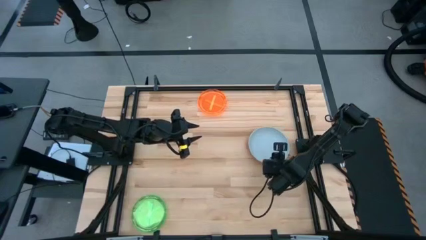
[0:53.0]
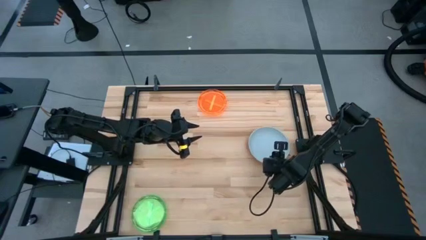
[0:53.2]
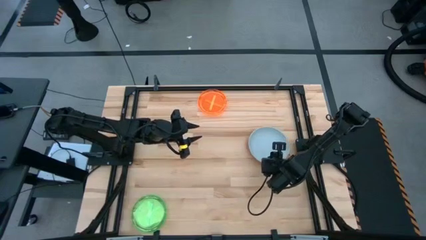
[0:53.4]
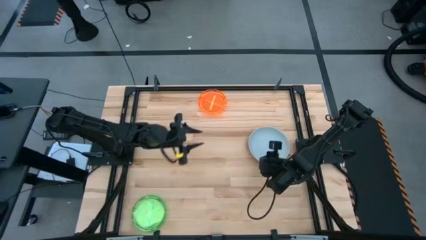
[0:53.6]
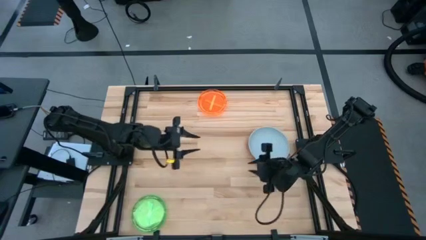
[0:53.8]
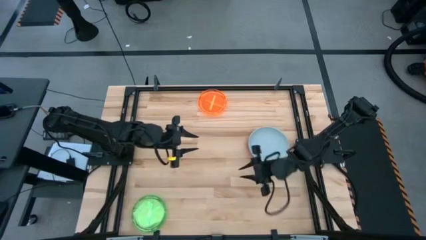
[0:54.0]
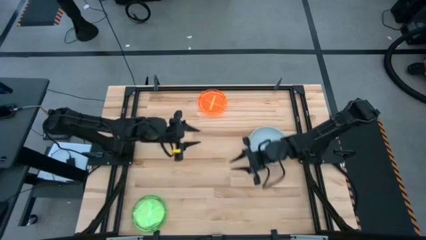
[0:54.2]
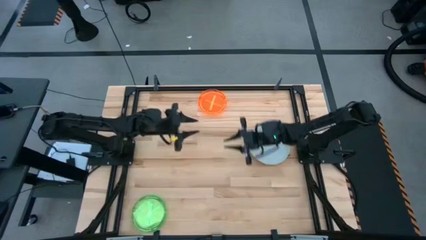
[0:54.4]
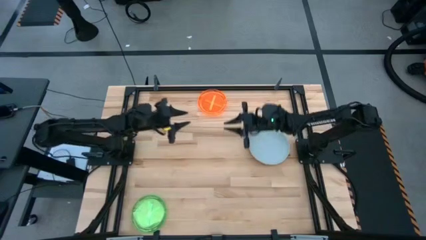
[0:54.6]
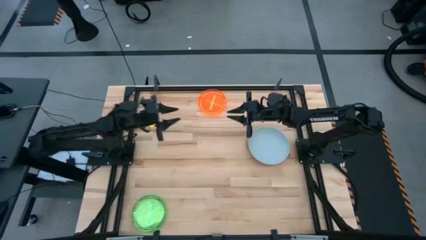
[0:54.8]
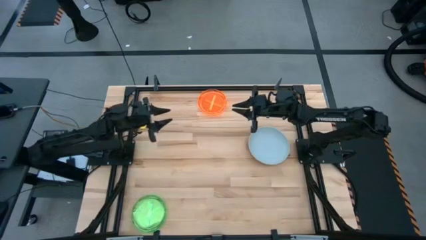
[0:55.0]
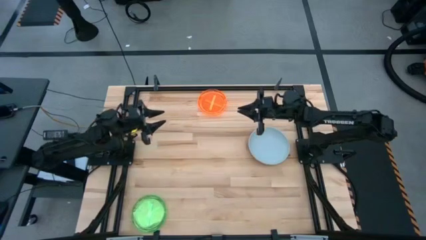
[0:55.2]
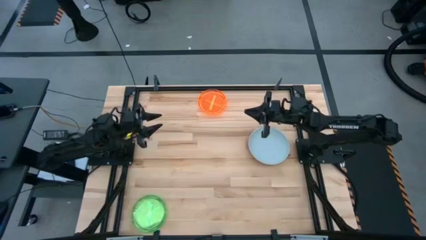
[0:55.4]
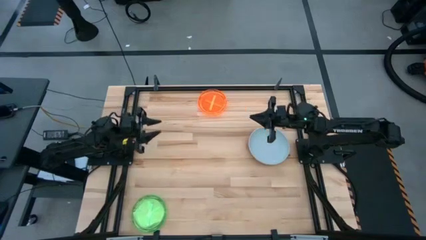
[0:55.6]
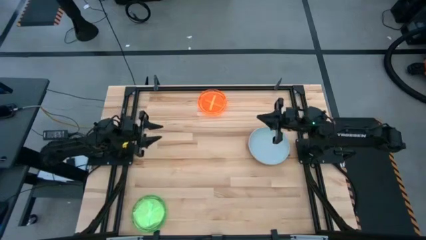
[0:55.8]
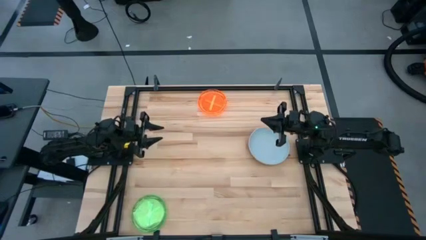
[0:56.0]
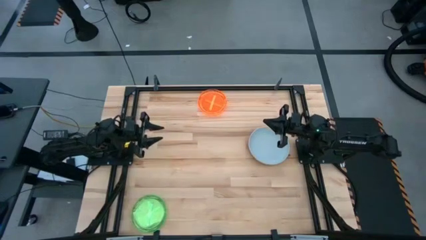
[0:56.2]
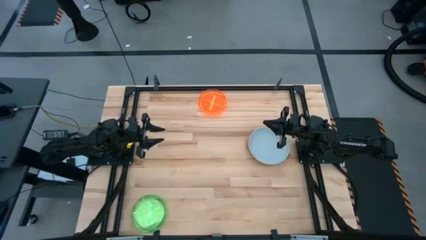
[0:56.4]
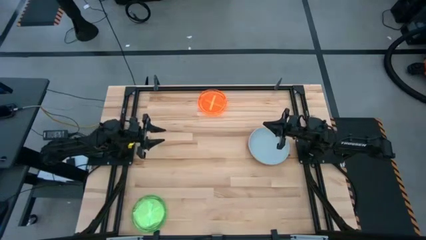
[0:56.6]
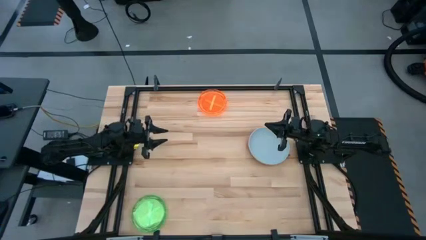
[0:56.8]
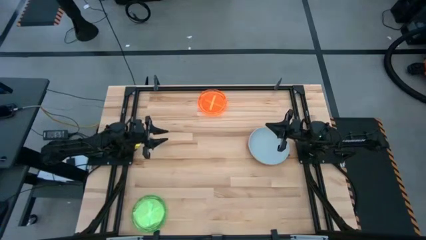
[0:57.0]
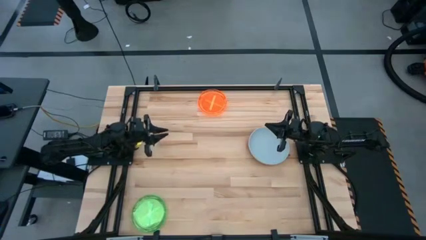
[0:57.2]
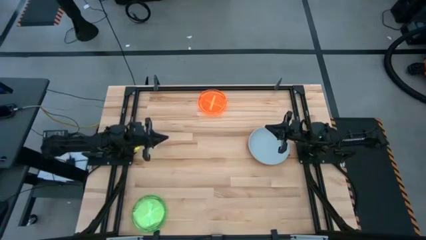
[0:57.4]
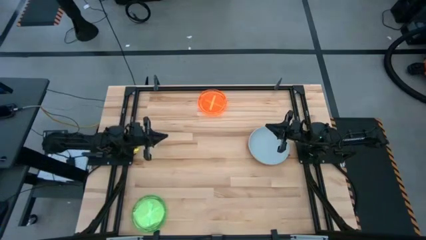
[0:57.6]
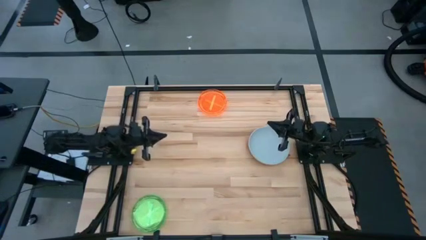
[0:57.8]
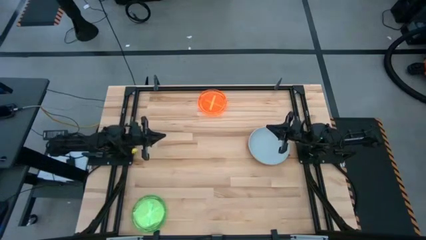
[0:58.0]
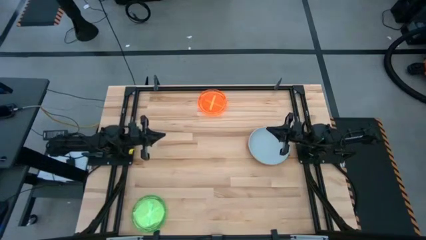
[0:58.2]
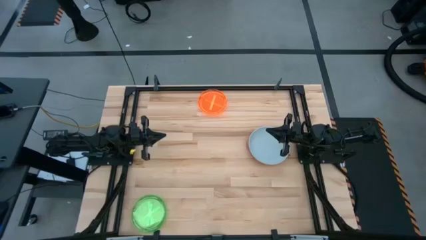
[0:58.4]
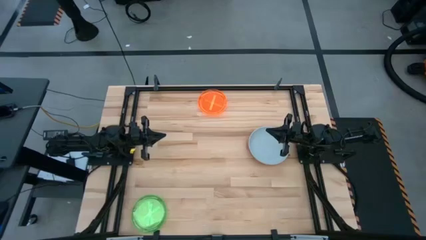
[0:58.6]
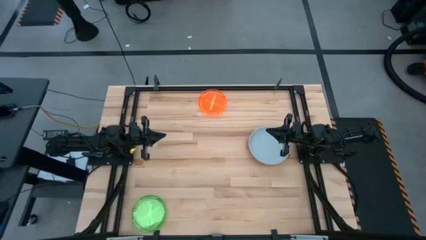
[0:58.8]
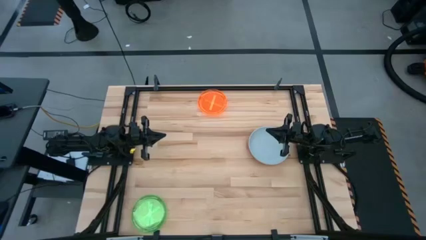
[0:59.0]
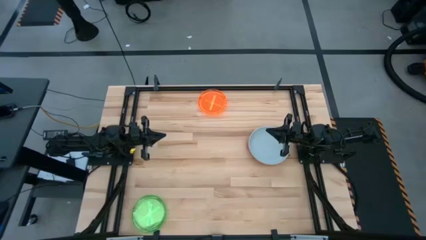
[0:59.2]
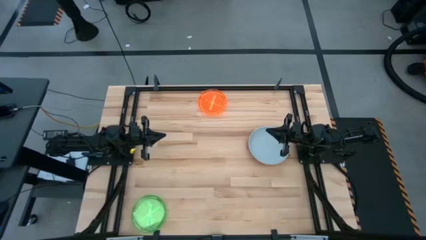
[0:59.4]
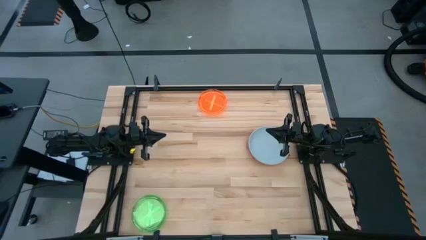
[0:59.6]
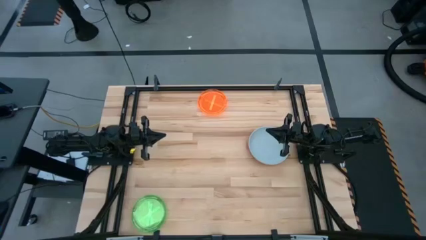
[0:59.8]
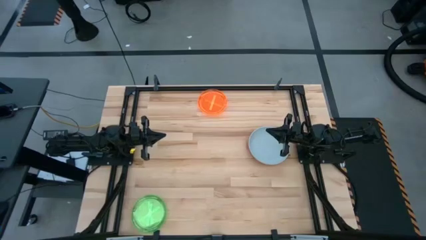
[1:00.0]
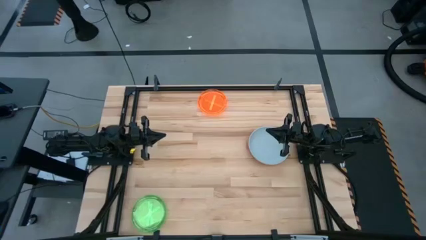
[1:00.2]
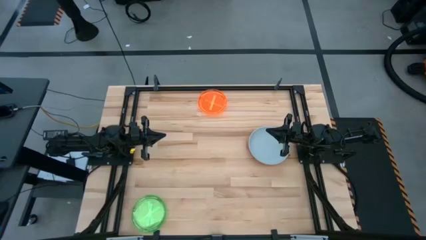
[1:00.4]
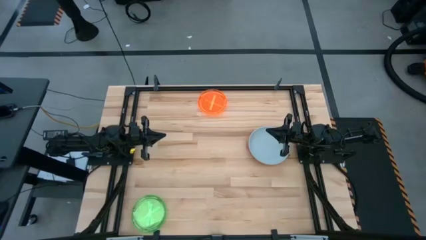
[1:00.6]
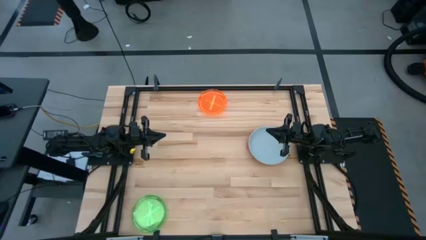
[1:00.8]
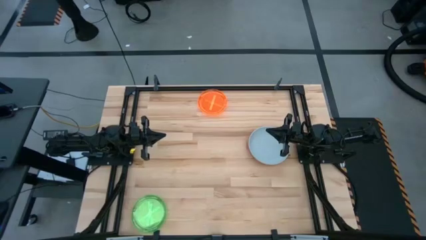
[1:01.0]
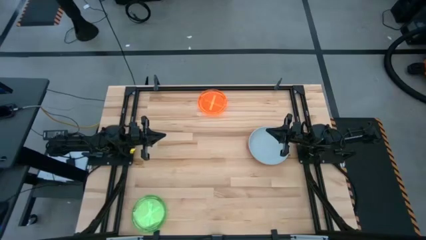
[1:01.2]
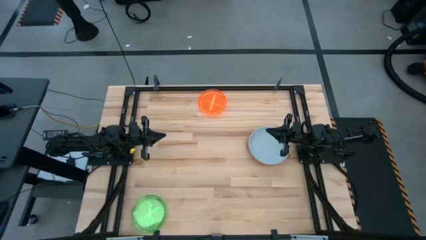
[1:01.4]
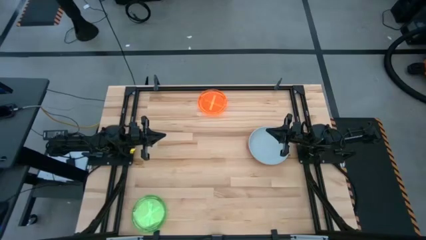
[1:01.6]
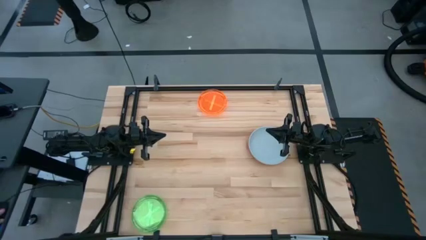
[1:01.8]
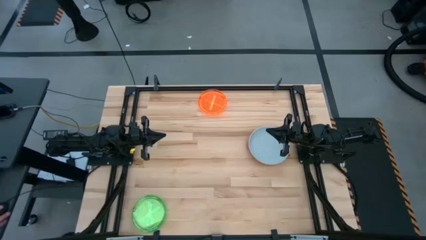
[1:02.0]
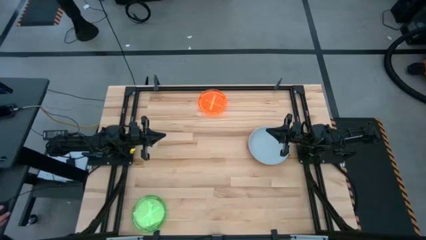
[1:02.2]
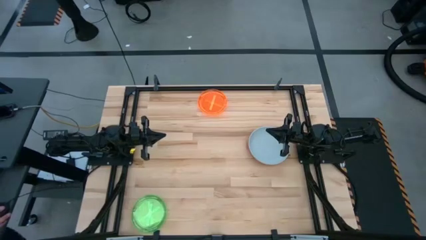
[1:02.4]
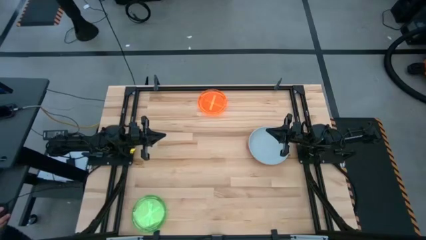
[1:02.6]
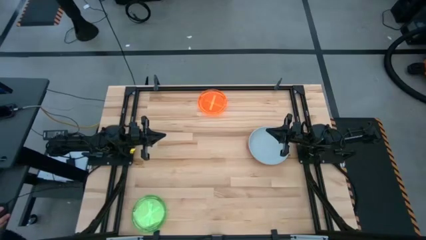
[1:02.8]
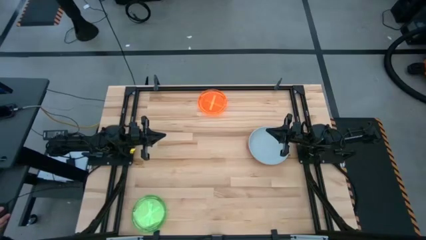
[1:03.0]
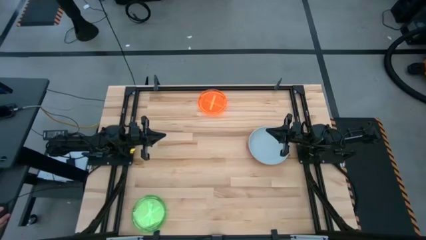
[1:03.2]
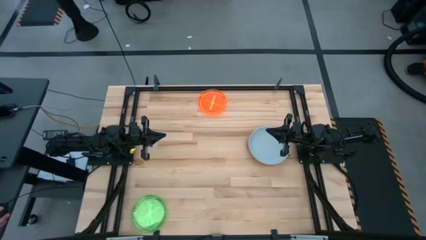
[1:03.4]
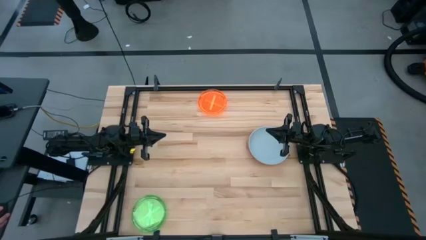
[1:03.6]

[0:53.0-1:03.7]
Task: Stack plastic plates
Return to Home Position

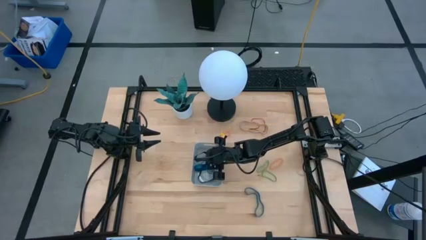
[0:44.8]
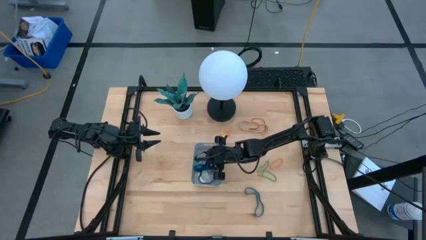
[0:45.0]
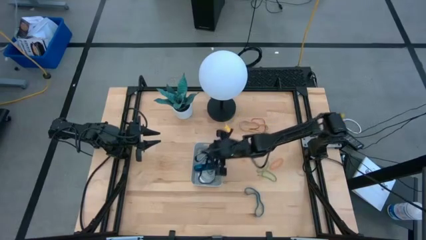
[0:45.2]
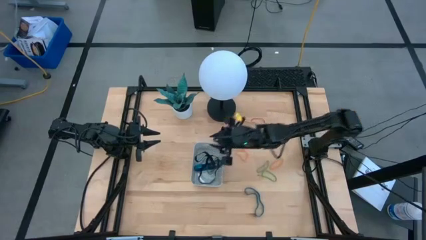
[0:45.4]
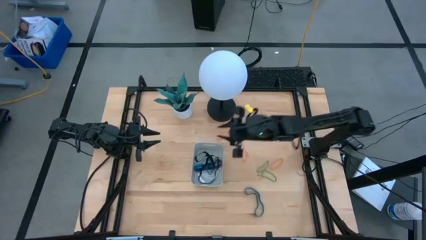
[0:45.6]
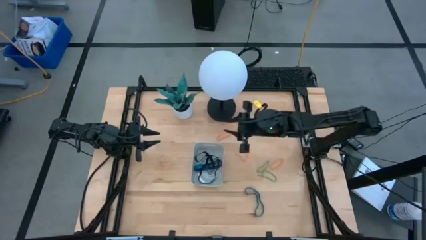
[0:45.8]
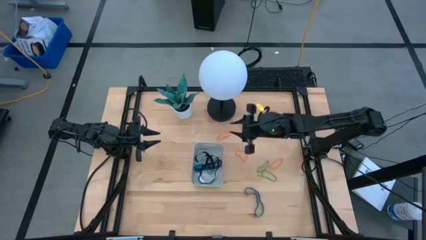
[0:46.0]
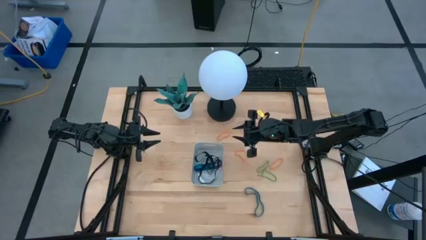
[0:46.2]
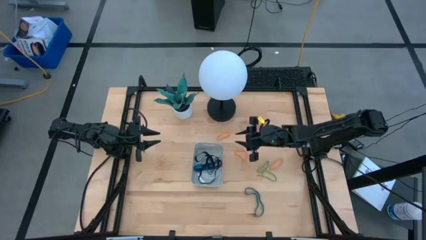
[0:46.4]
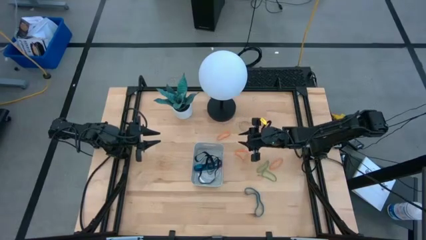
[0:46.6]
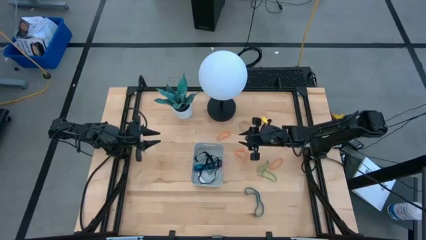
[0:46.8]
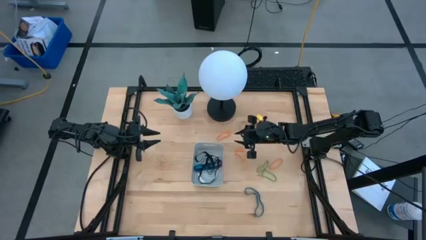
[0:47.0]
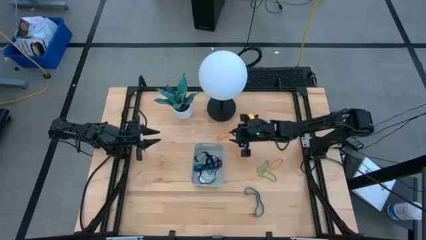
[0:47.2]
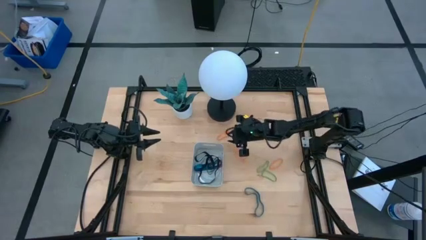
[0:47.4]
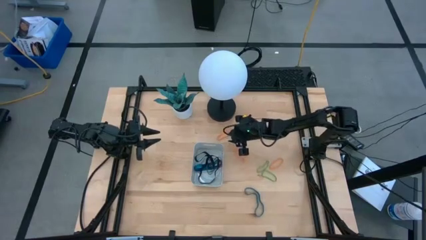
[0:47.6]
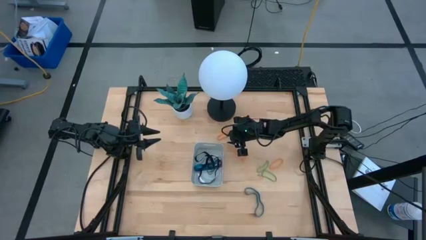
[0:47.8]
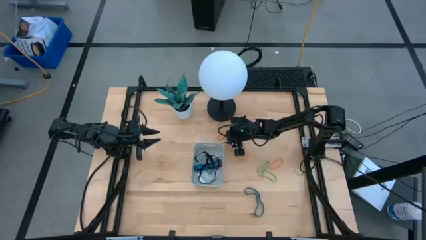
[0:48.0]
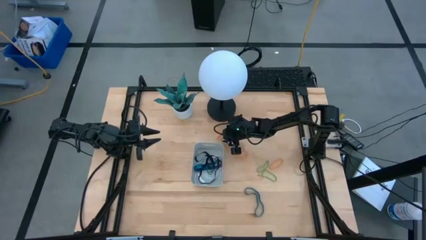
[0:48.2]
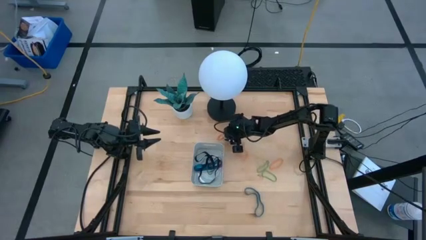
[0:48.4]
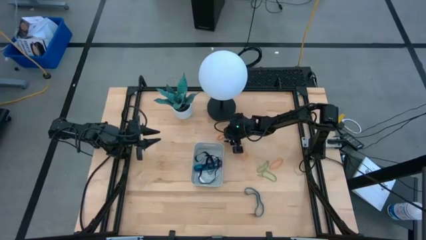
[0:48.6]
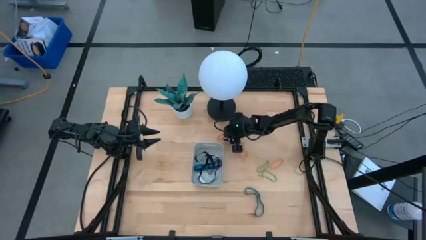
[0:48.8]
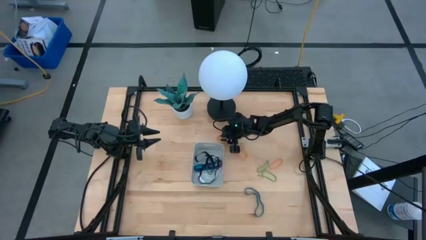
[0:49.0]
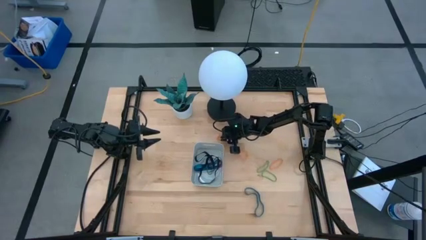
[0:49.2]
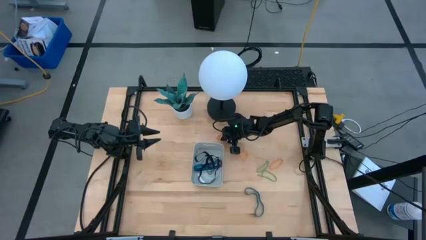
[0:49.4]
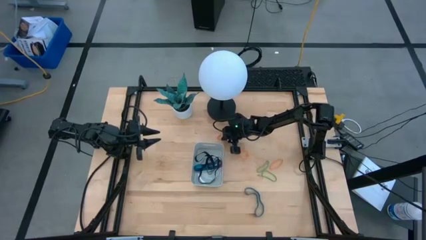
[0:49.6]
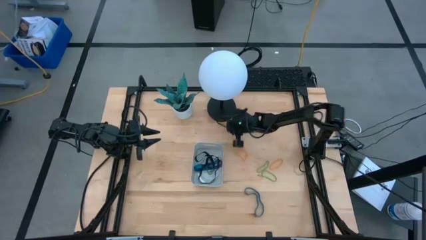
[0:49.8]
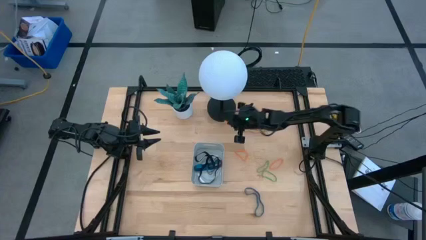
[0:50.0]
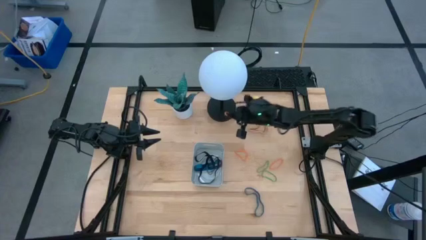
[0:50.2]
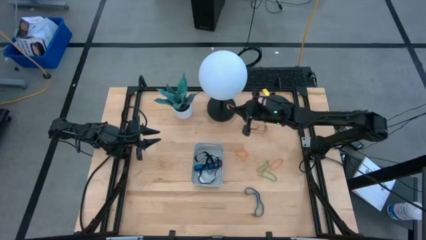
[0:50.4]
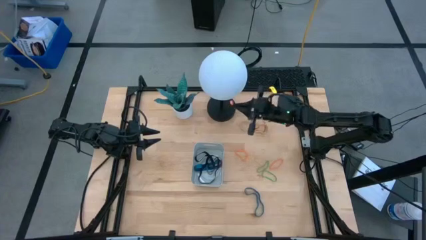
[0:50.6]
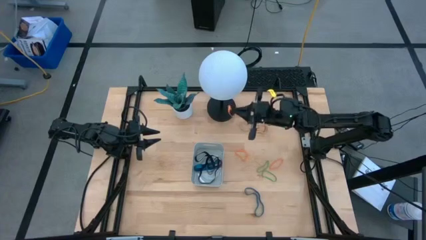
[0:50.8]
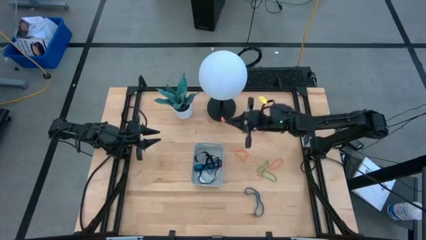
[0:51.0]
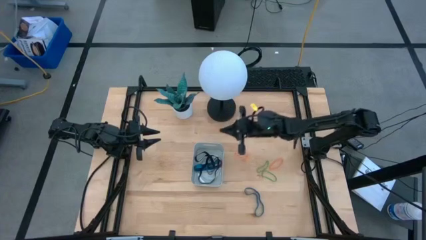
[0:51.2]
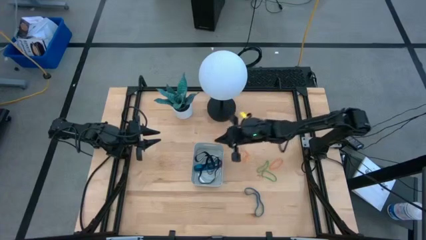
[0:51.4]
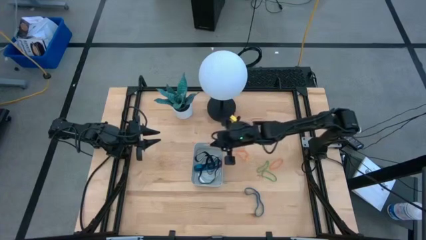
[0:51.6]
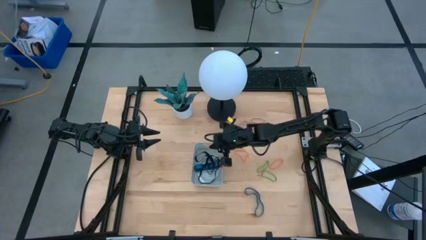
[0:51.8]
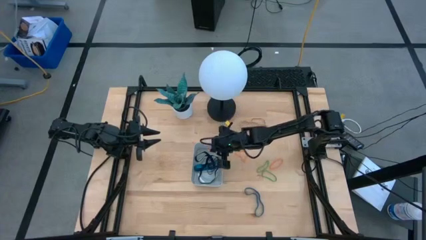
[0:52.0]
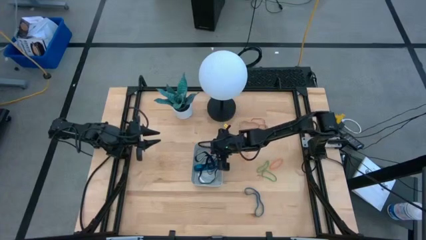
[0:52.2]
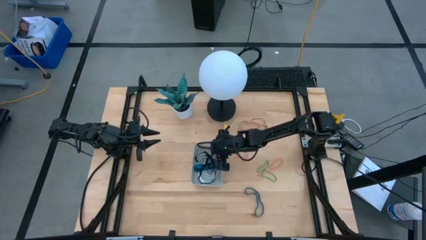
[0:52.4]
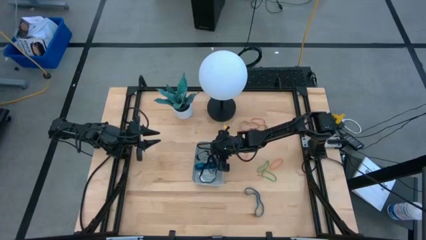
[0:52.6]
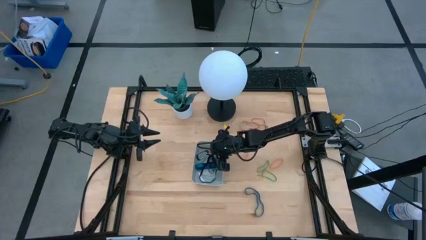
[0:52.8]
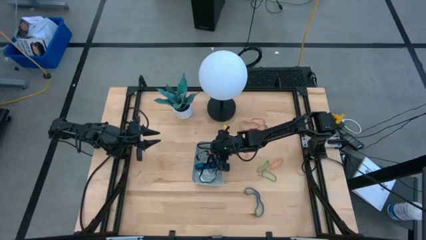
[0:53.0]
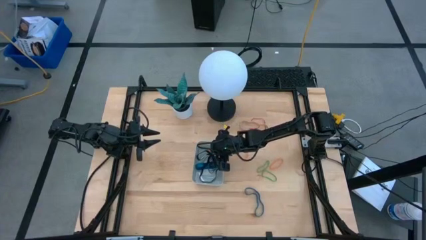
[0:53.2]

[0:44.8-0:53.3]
Task: Pick and place rubber bands into bin
Put the top orange rubber band into the gray bin
